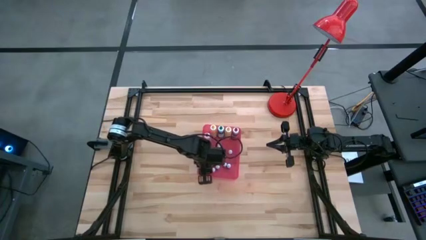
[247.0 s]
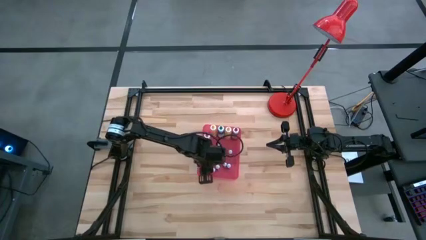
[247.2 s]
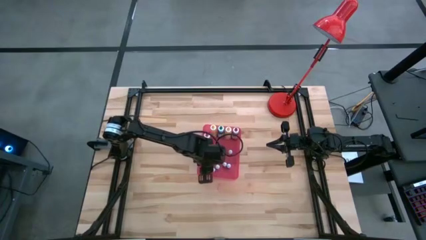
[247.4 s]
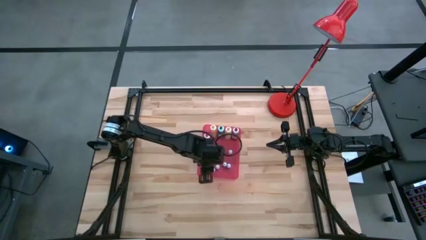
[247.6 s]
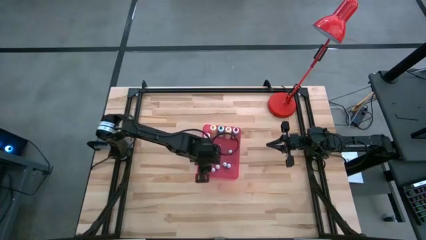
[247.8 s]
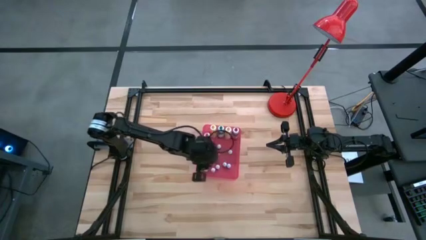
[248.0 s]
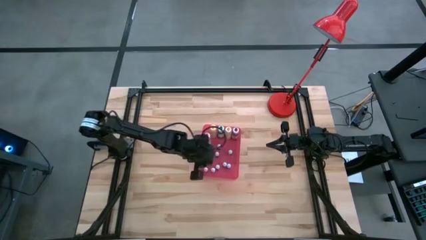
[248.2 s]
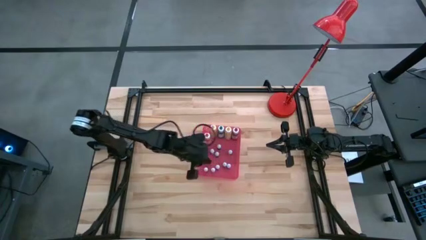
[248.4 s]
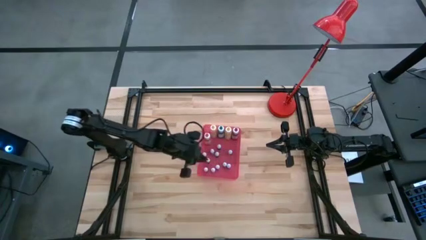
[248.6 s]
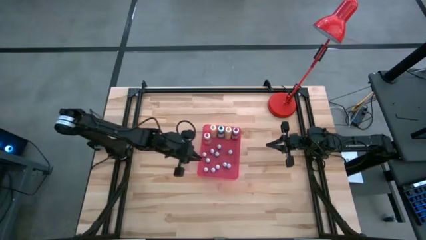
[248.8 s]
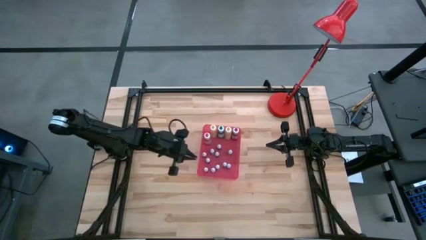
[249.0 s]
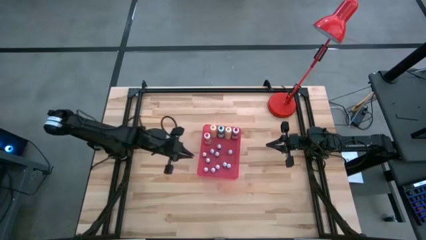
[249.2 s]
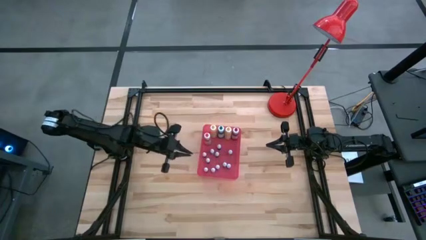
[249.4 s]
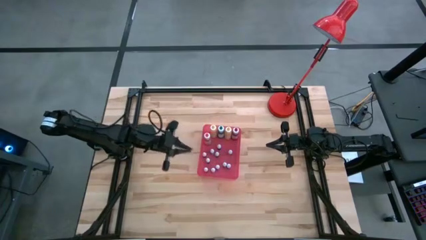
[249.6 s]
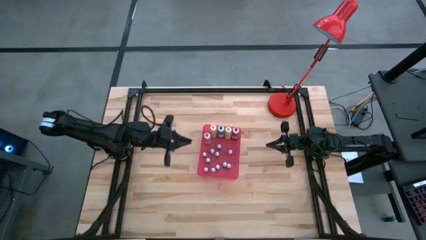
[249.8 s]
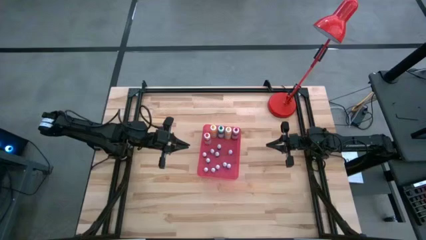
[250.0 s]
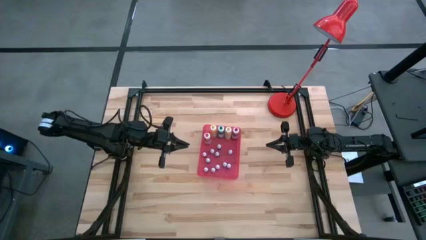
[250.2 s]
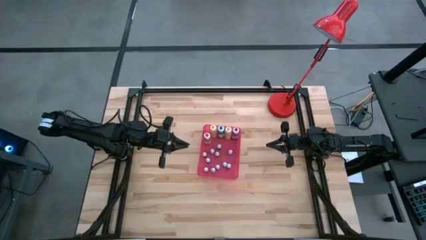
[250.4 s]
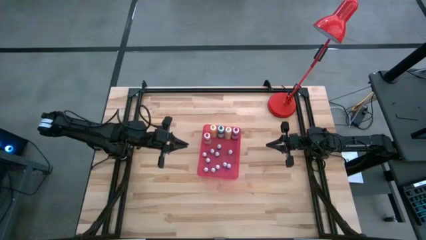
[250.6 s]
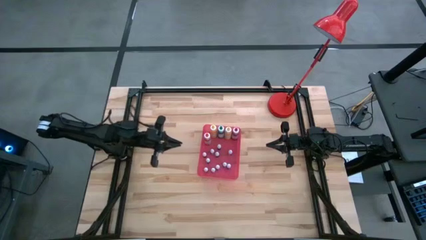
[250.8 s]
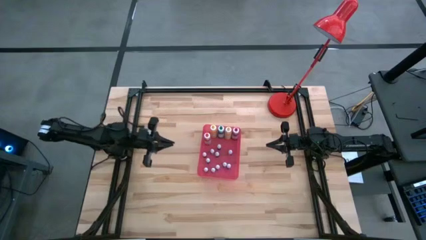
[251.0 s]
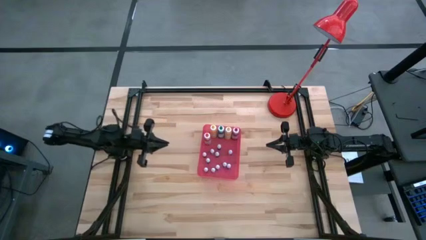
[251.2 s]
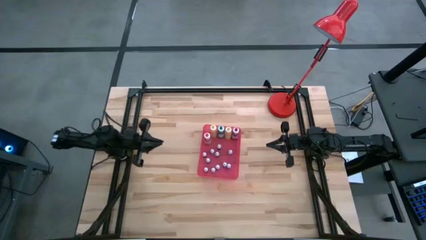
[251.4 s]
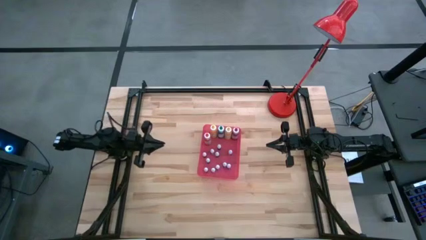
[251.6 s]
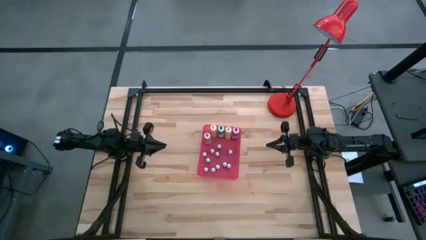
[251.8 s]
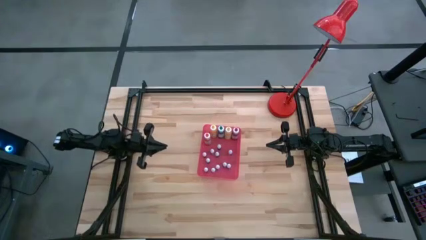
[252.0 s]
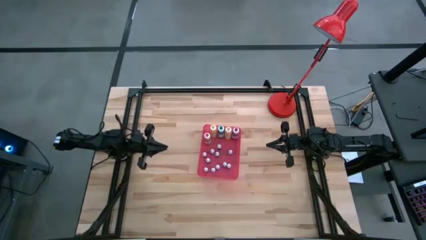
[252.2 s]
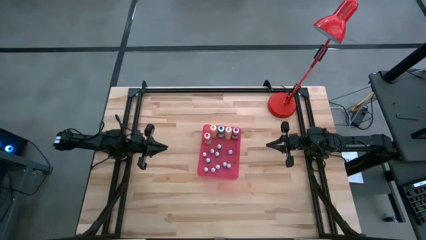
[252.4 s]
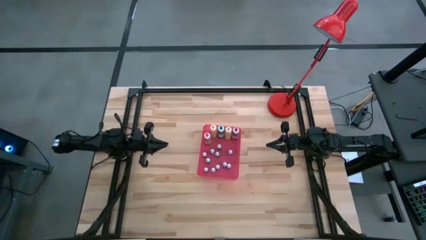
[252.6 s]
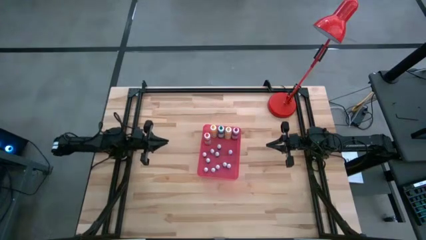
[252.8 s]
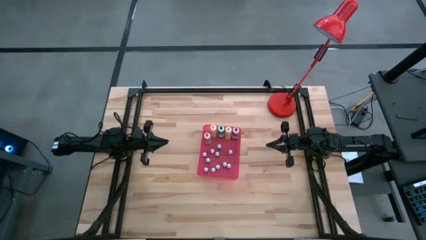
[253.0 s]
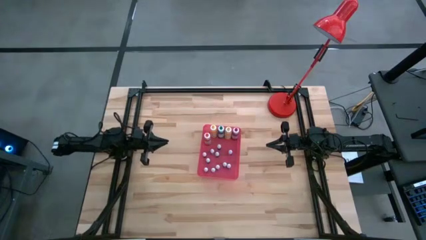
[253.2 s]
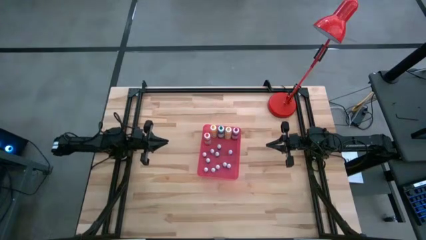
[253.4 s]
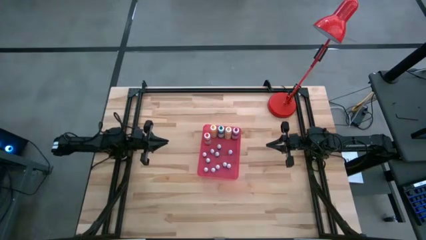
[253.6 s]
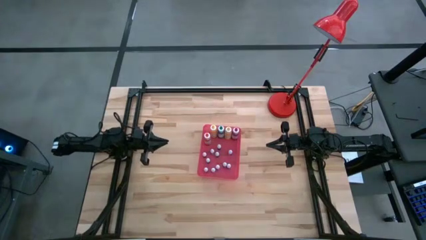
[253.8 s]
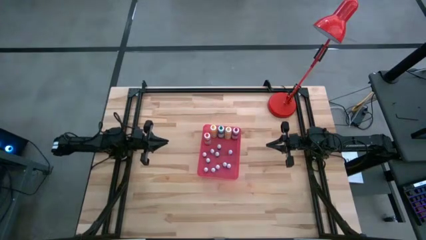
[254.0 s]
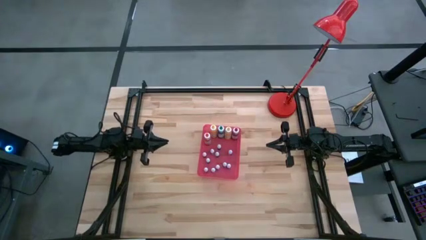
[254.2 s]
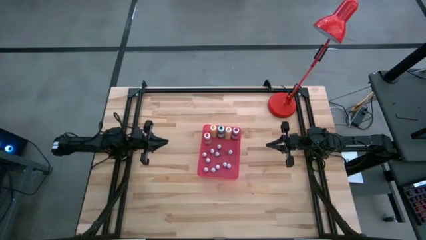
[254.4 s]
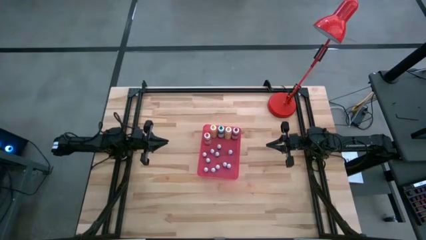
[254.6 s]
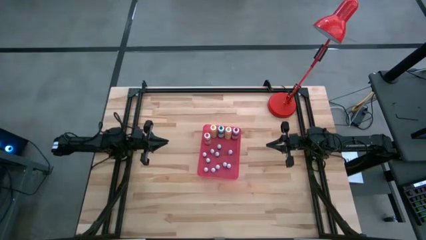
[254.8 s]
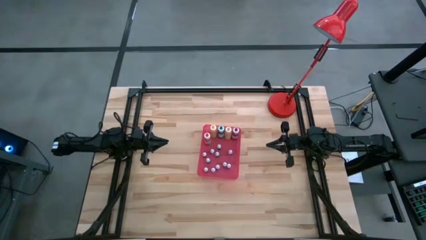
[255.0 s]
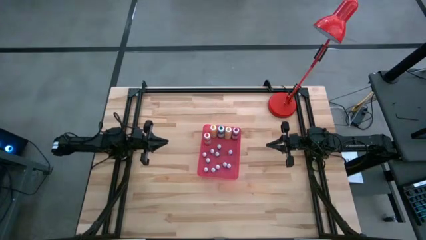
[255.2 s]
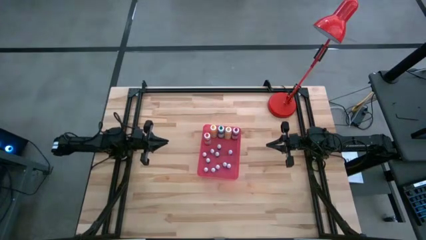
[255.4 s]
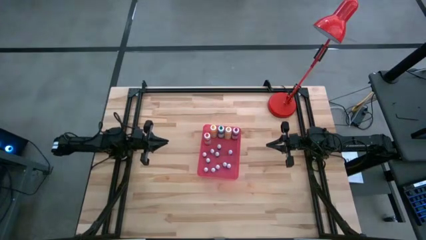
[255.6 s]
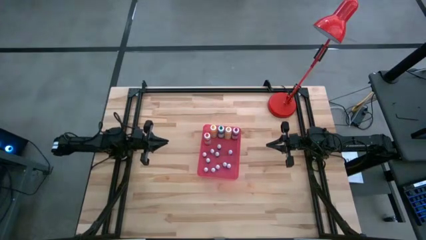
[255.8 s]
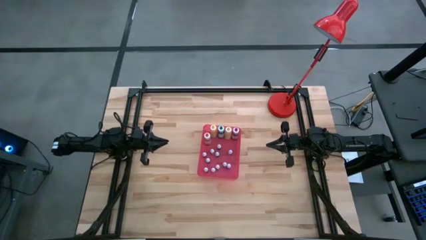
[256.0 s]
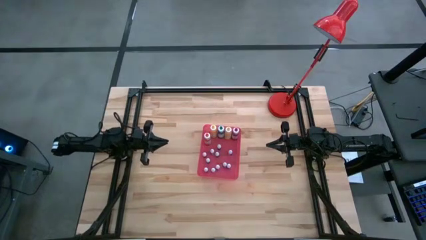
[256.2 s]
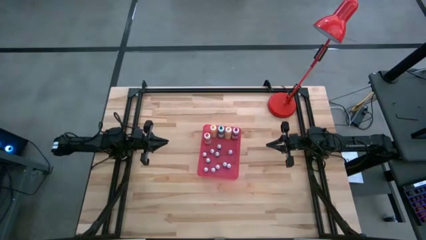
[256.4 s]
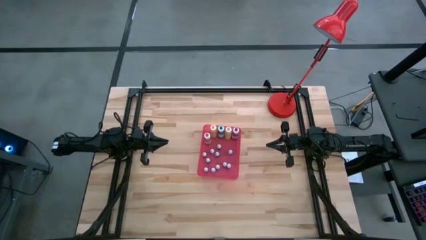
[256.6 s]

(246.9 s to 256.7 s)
Task: Pick & Place food coloring
Return to Home Position

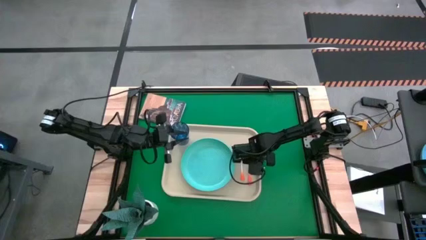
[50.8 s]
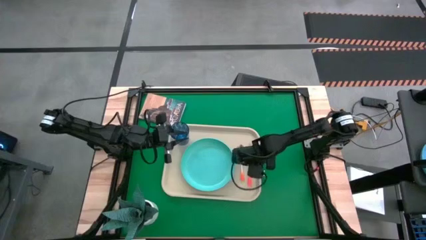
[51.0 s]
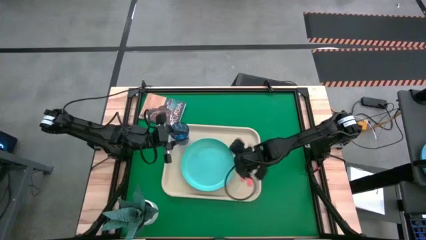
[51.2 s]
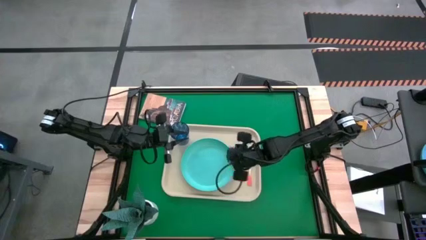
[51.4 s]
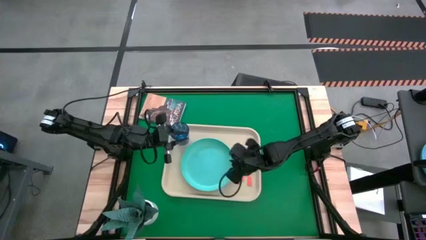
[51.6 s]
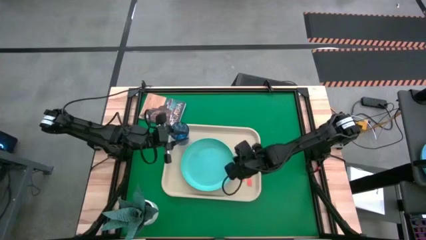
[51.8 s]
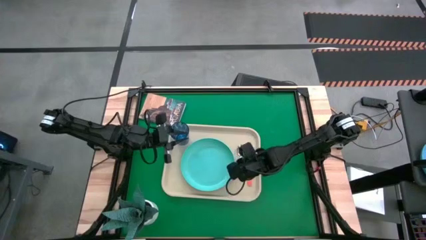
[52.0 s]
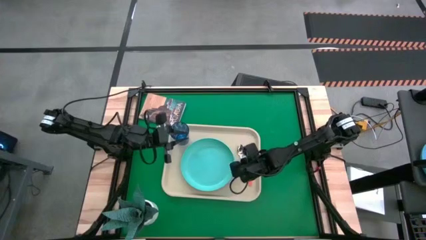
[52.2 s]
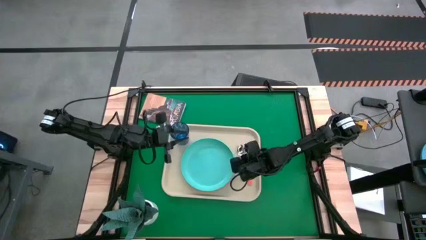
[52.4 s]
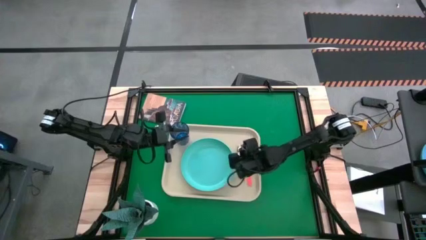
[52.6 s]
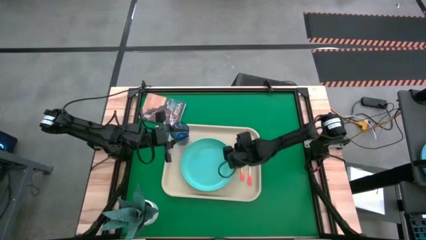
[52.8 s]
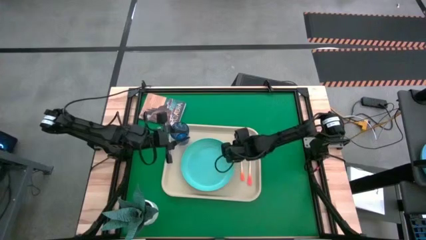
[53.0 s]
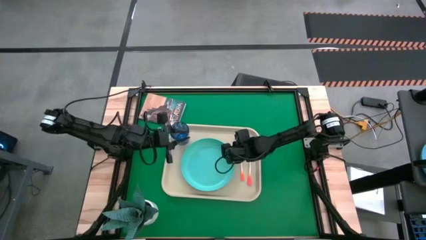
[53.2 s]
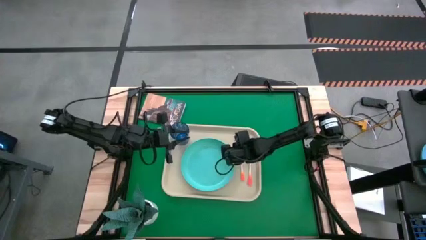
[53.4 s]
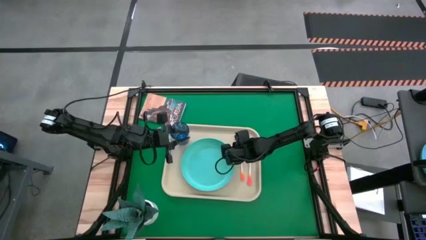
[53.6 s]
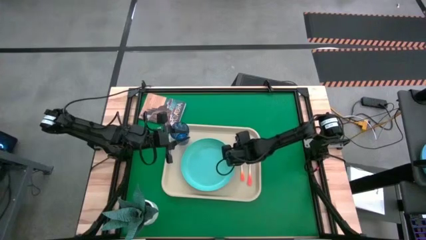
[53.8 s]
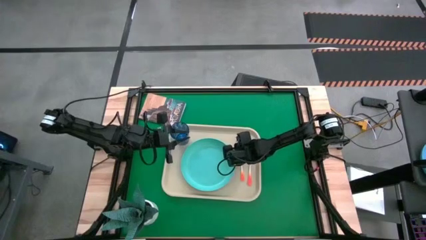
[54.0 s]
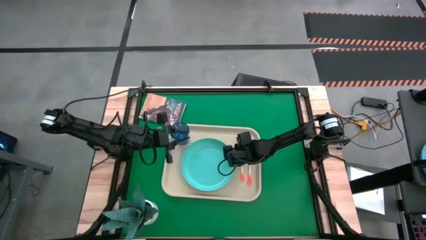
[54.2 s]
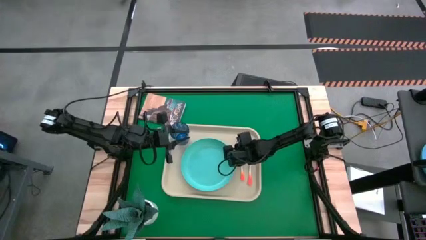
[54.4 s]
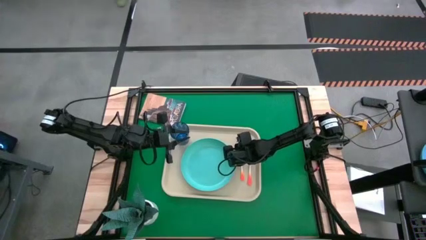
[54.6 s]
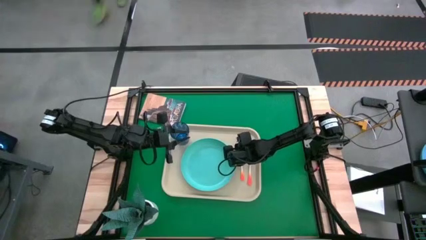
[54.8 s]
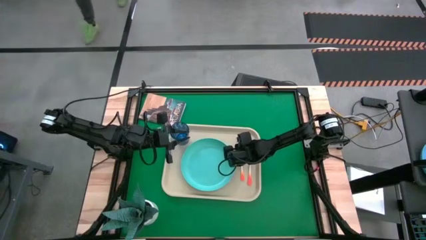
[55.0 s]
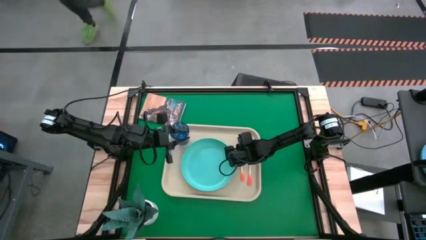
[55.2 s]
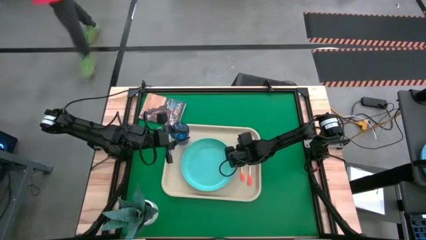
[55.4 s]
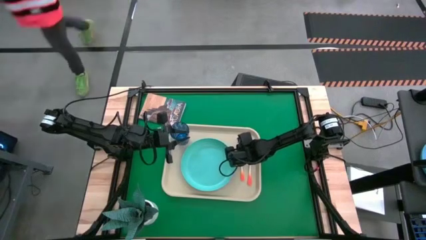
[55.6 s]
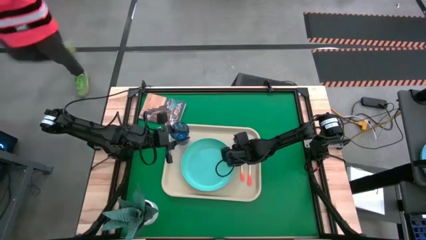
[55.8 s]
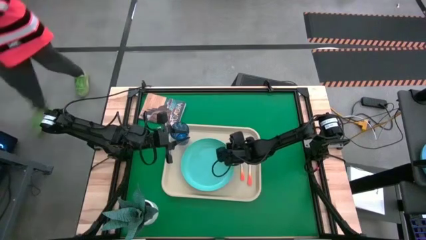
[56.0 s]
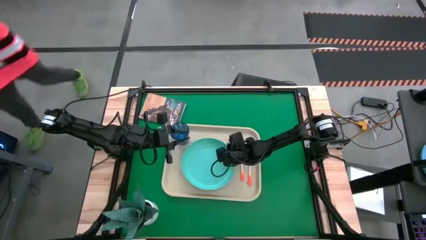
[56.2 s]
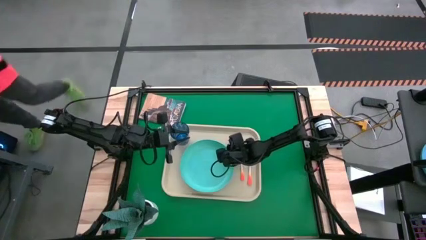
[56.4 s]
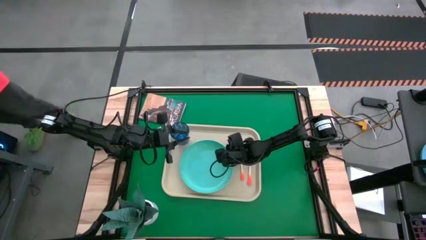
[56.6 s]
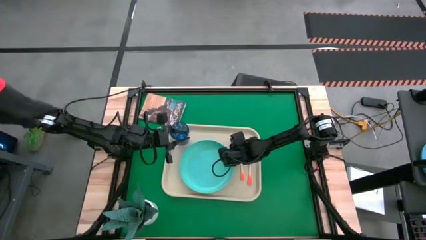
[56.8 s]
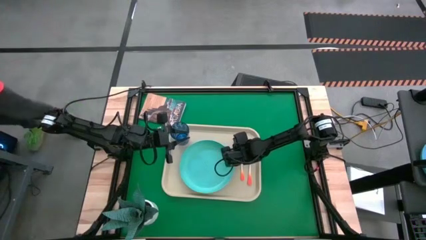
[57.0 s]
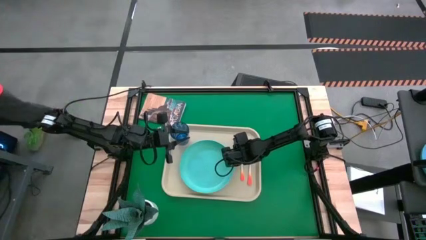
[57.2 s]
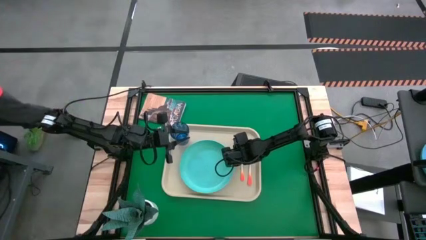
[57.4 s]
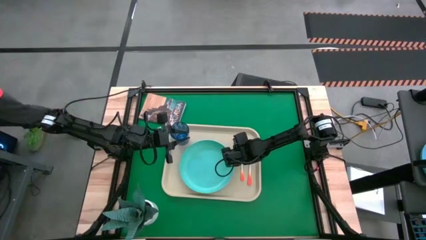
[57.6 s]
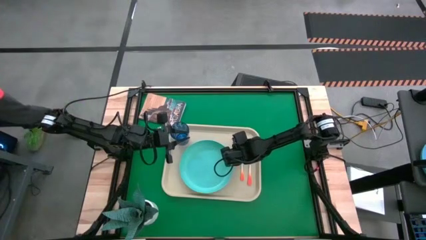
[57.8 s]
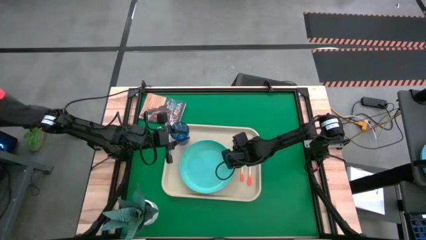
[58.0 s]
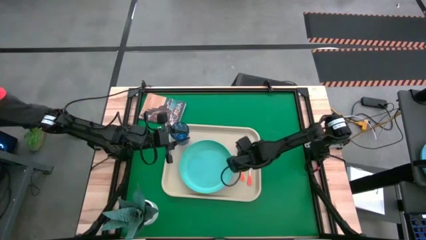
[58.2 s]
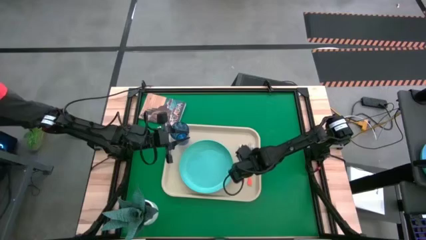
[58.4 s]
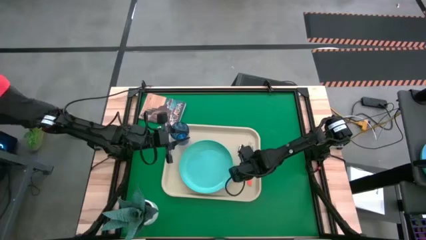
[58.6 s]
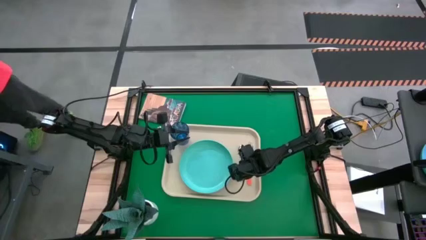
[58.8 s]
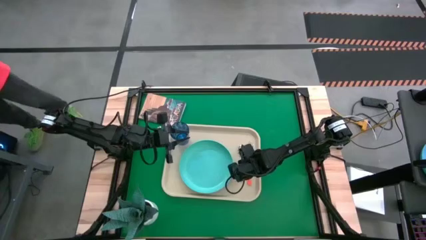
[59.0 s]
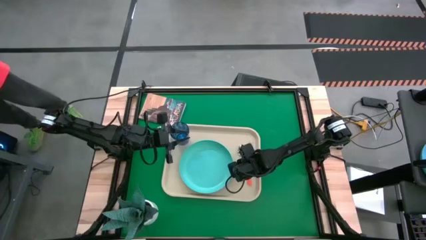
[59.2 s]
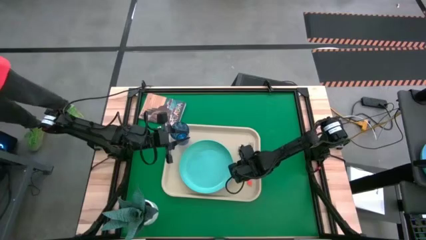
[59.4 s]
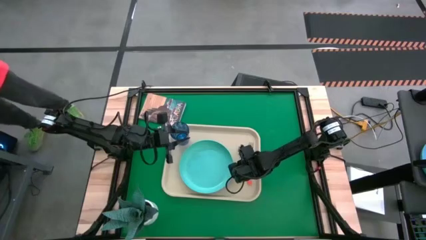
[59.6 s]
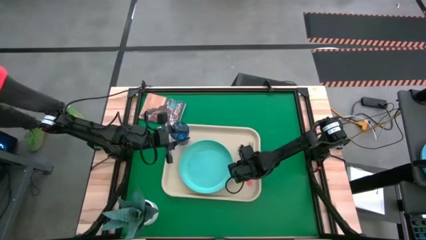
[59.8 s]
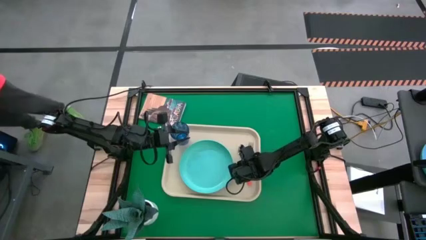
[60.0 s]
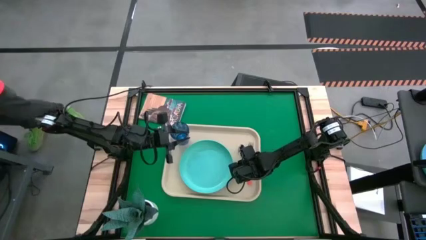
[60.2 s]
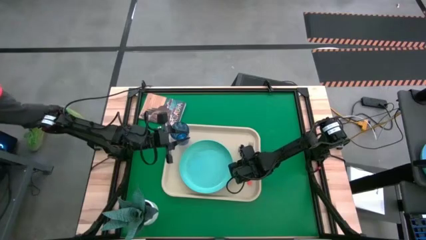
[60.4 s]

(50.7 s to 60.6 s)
Task: Pick and place plate/cup/fork/spoon on tray
Adjust the utensils on the white tray
